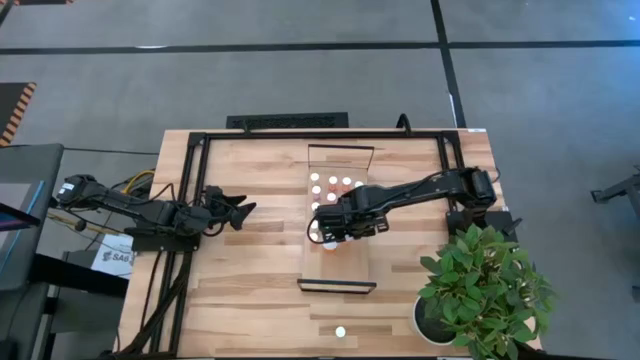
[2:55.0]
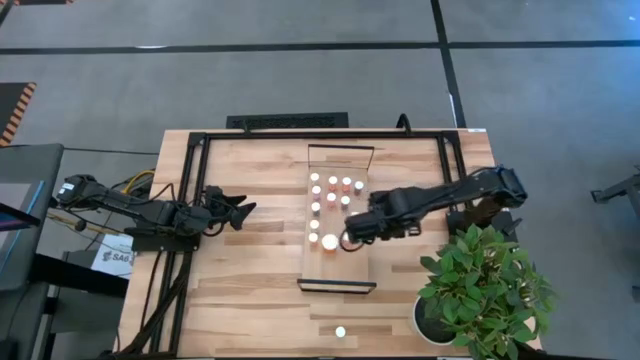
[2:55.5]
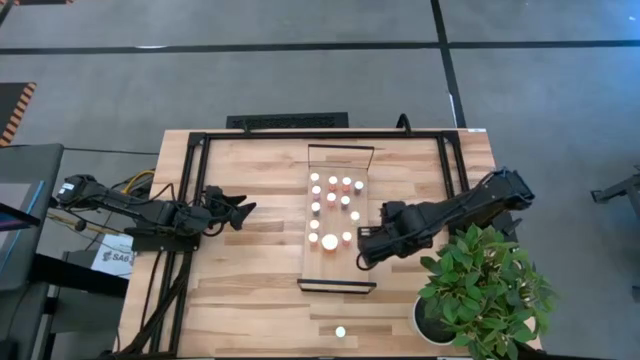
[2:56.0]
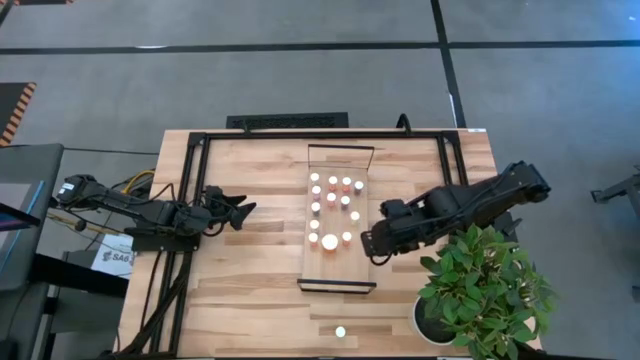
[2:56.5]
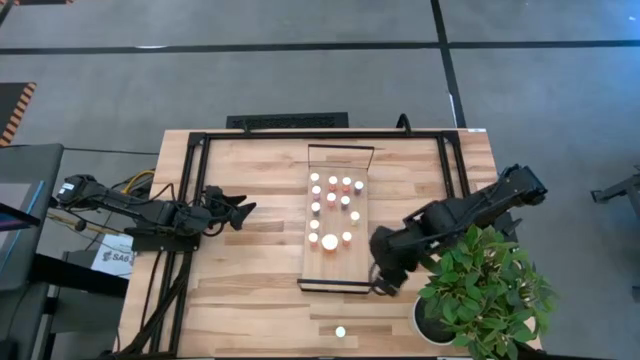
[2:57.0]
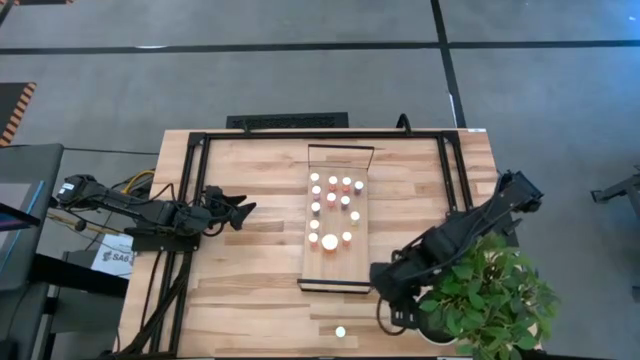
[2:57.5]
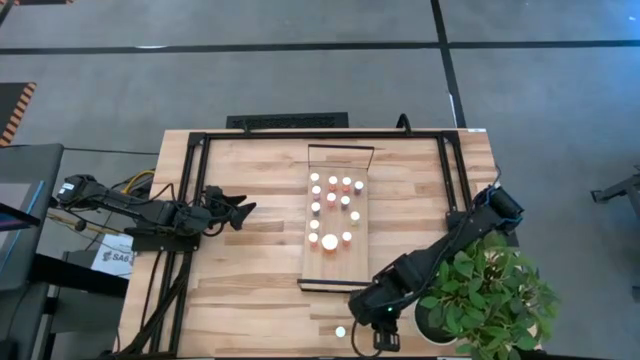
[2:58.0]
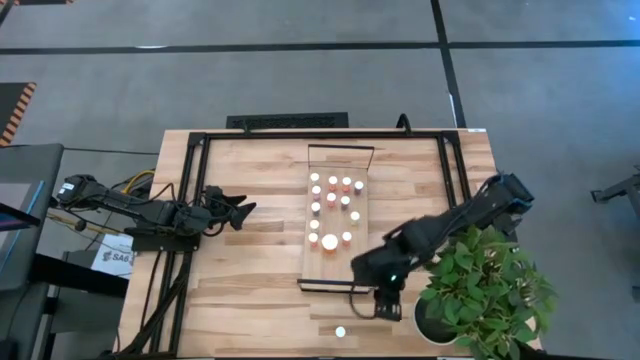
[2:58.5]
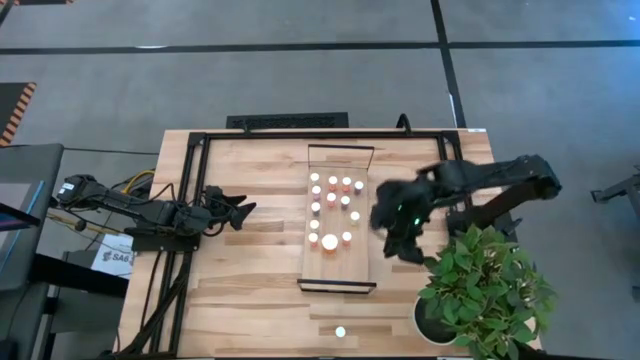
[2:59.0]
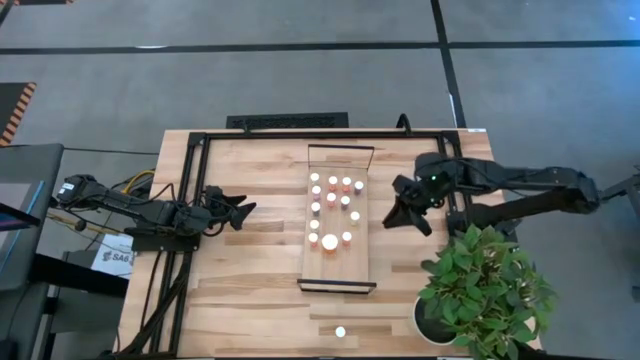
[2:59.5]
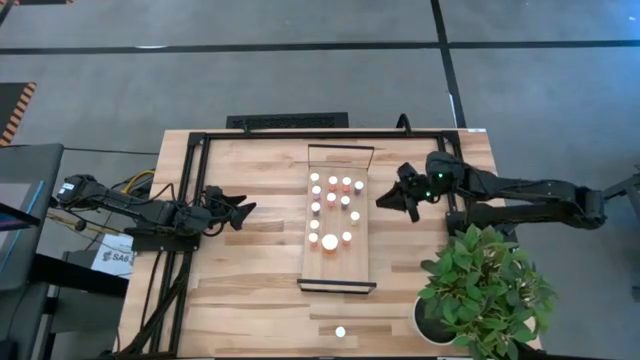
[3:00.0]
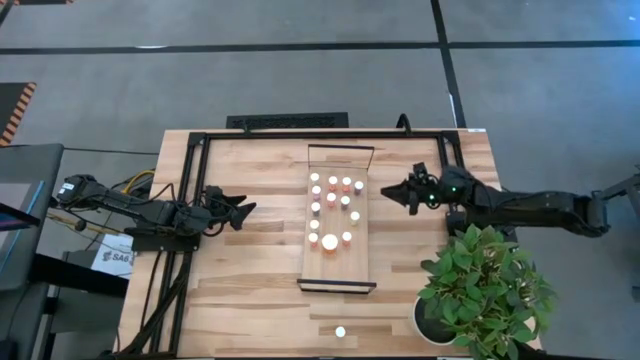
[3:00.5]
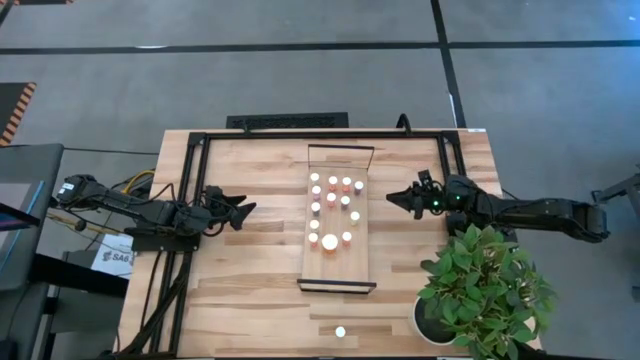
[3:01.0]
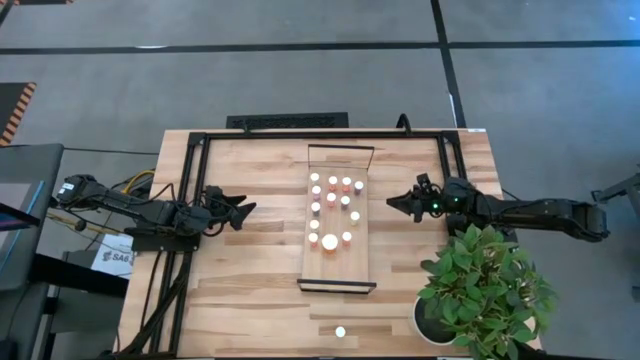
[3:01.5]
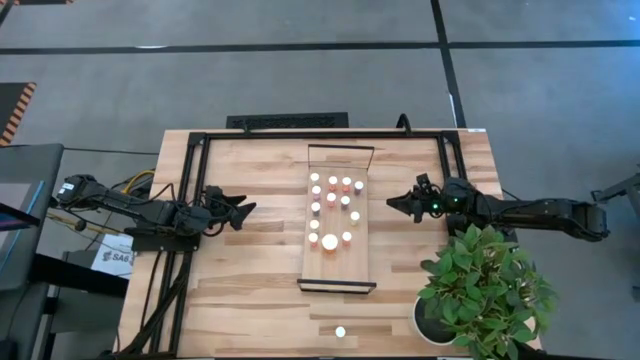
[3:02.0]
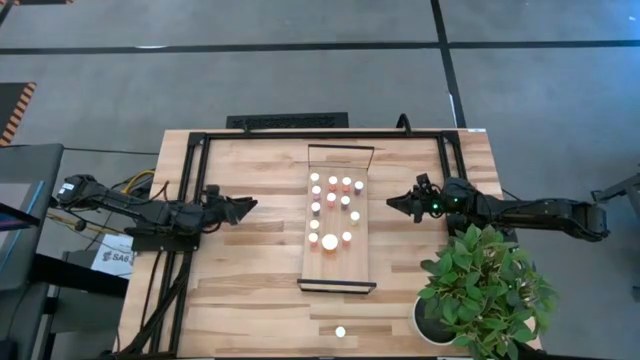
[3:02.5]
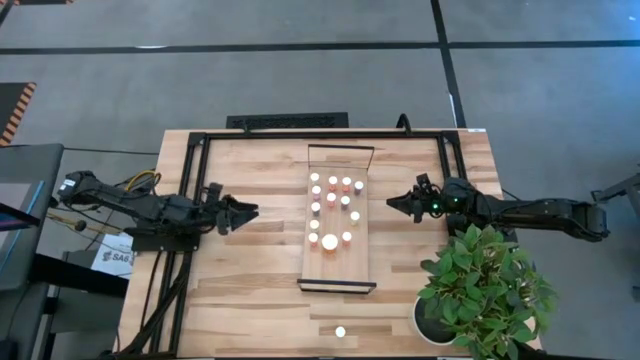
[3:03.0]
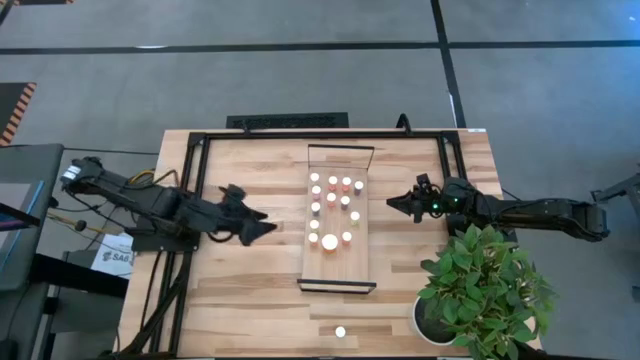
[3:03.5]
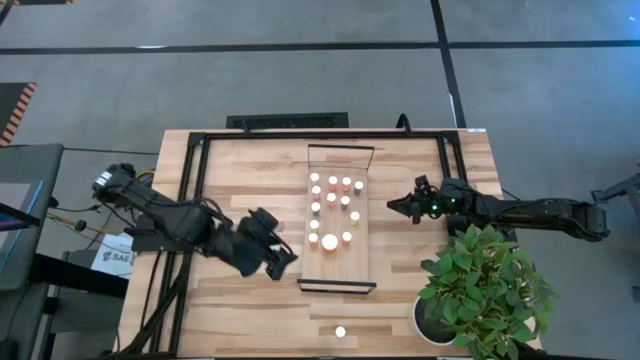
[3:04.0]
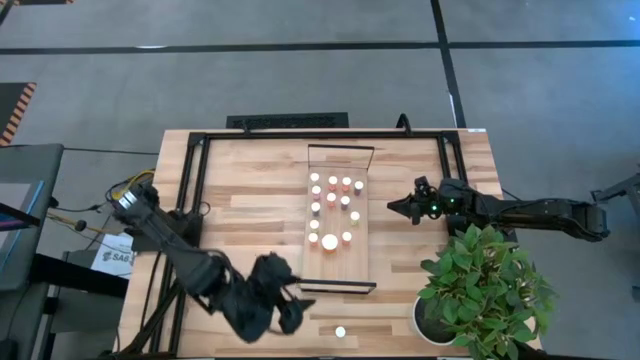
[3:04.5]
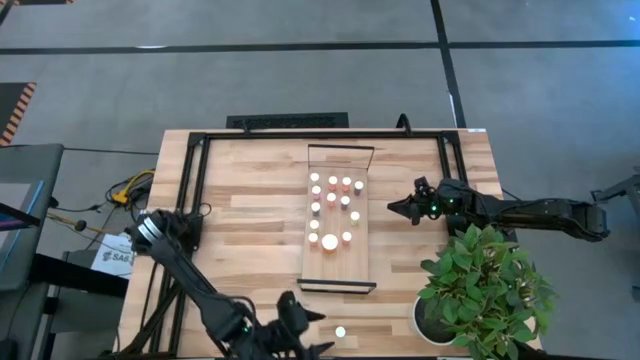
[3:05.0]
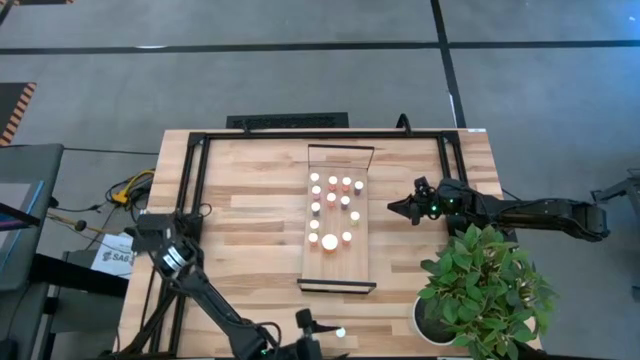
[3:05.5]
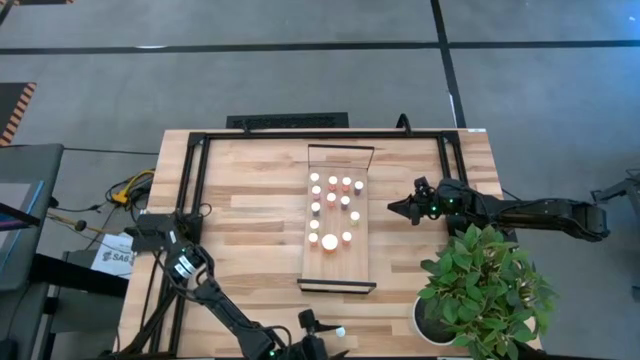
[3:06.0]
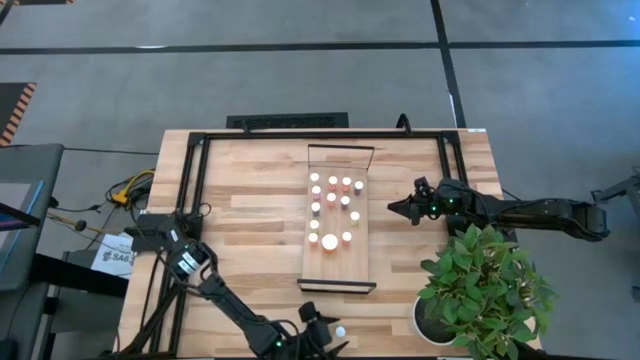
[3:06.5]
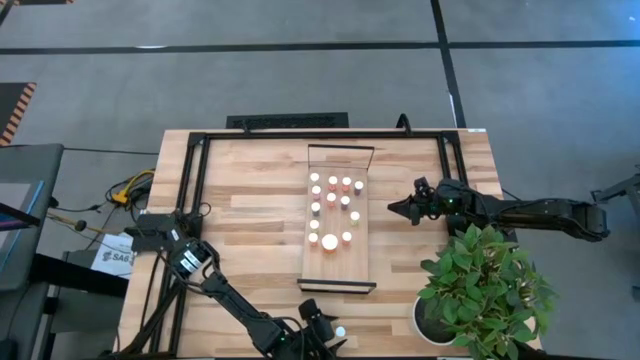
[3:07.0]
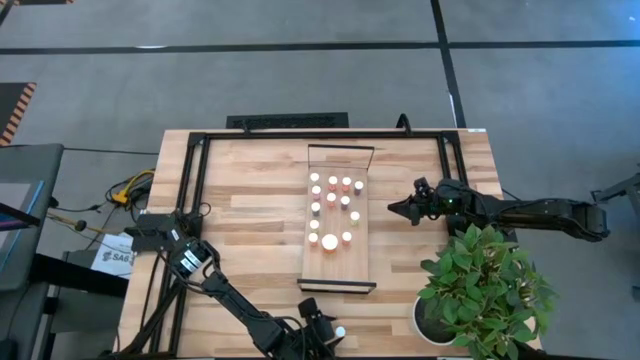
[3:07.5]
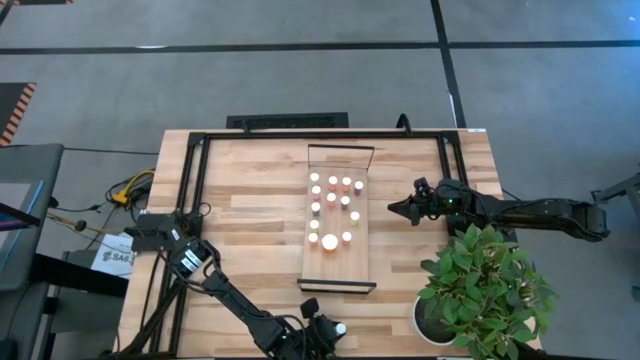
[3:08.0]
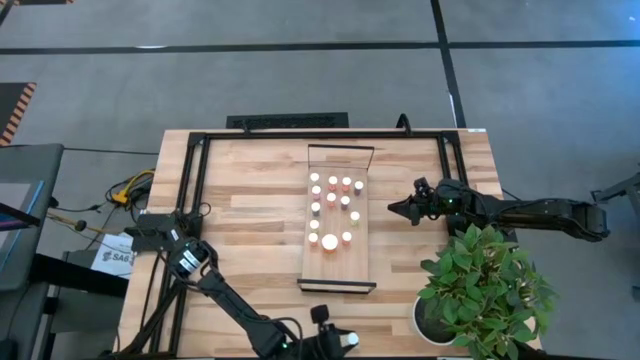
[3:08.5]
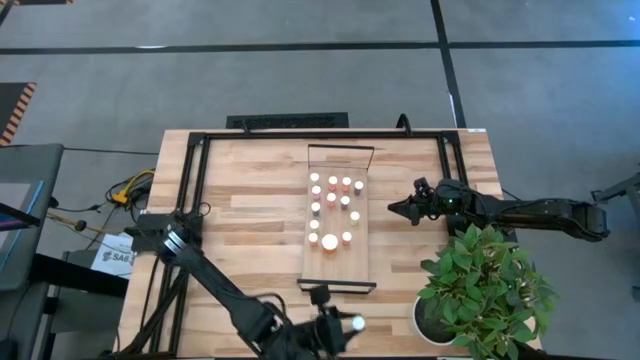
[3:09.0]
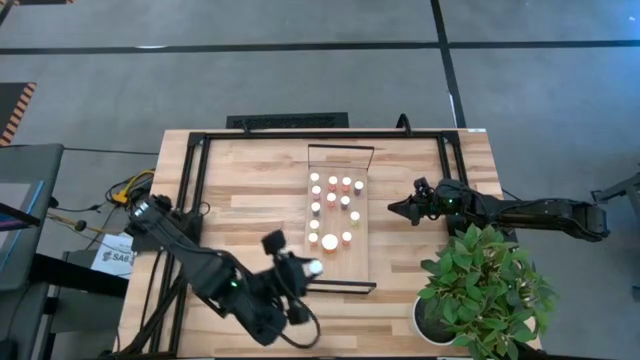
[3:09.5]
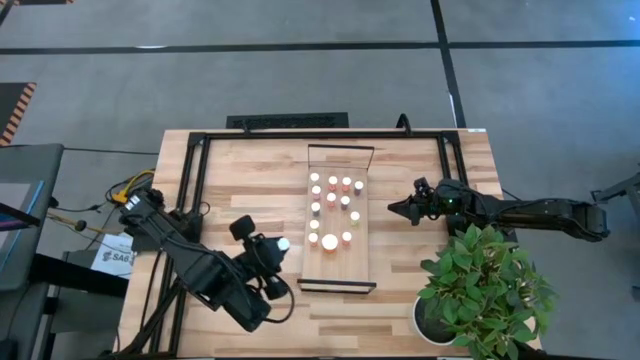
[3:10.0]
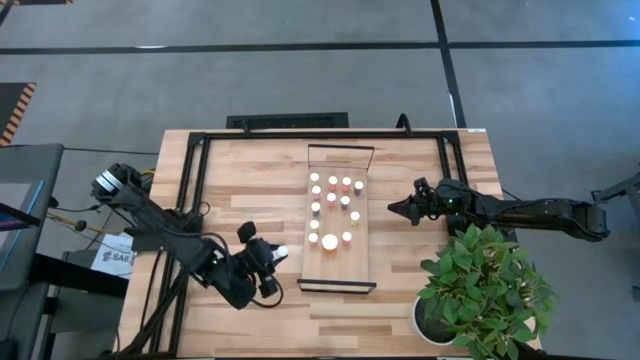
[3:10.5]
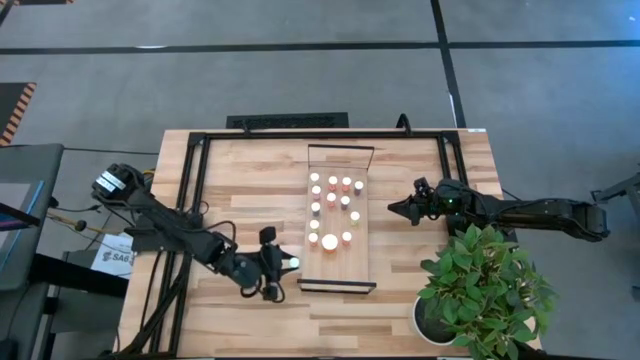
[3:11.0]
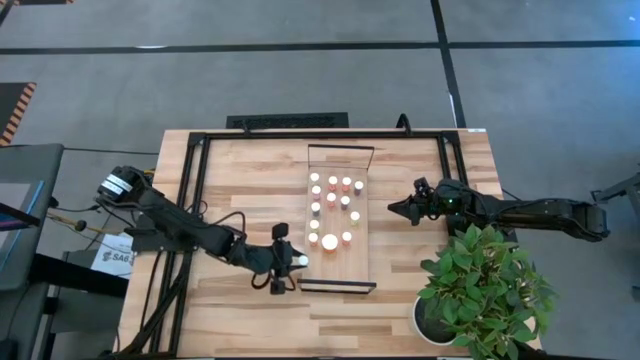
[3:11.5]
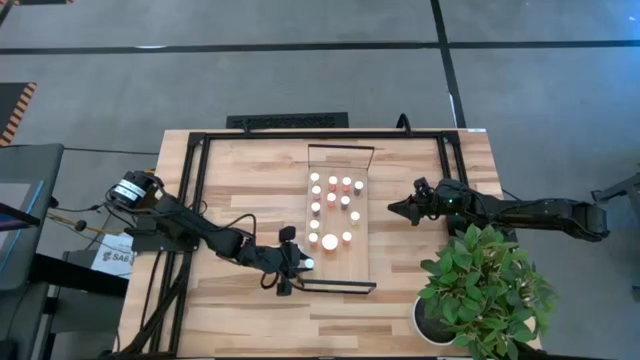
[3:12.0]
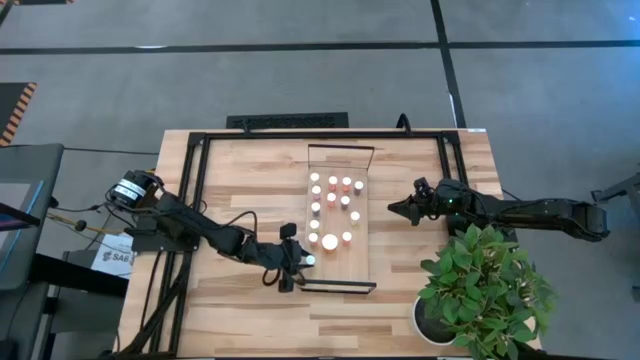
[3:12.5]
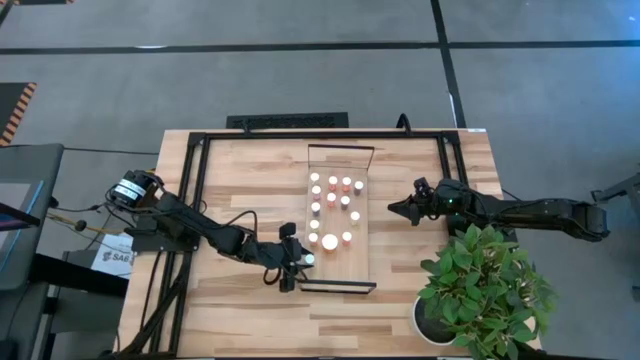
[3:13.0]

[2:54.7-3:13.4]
Task: Pick and place medicine bottles onto shelf by color
Put the yellow pill bottle on the shelf

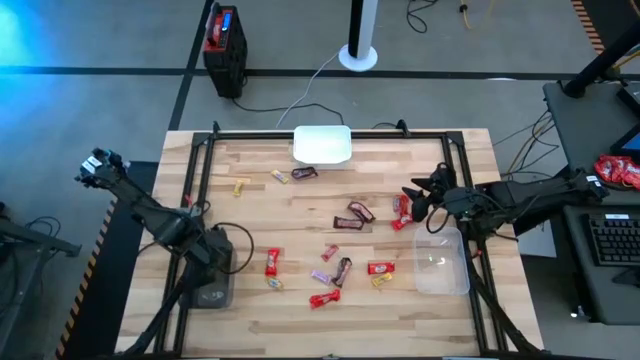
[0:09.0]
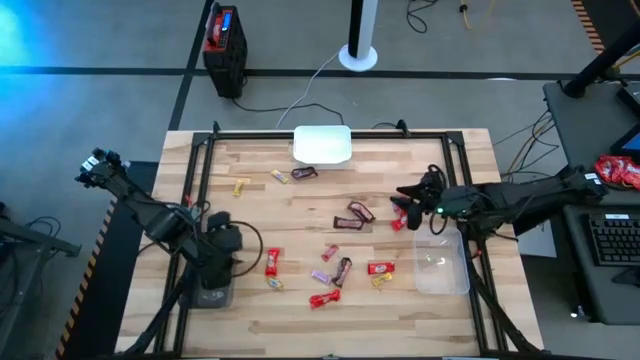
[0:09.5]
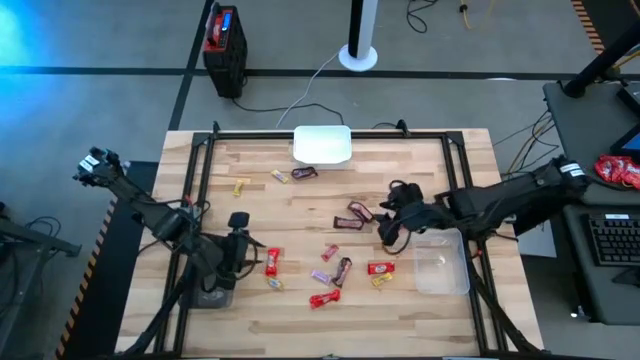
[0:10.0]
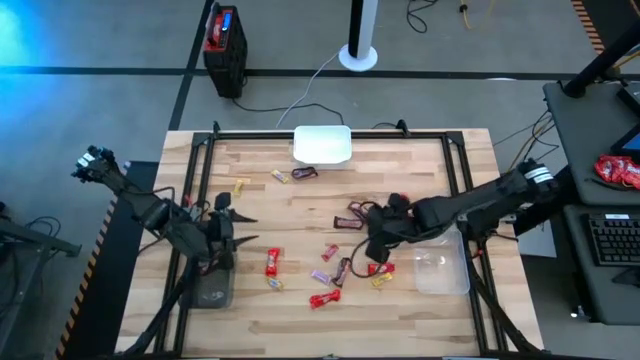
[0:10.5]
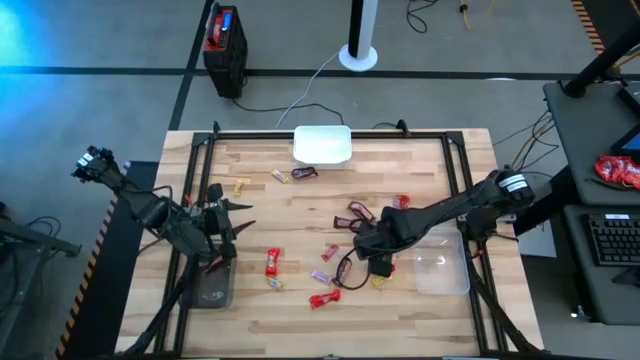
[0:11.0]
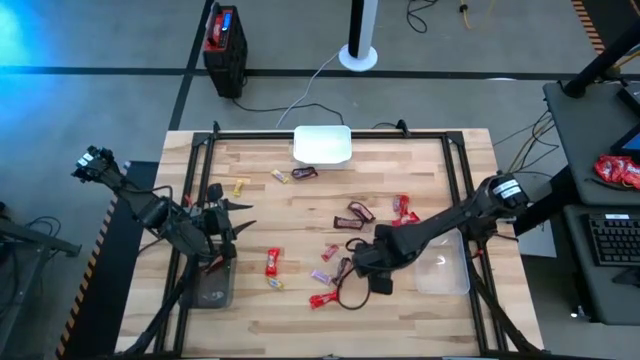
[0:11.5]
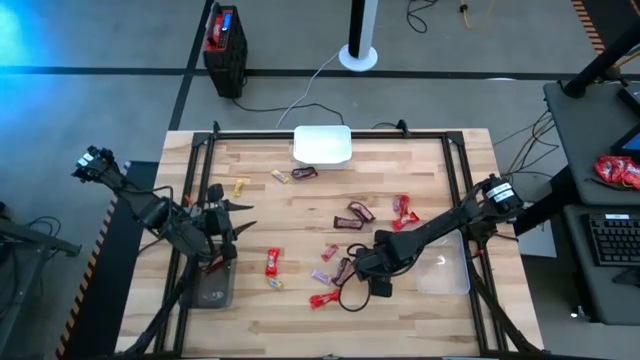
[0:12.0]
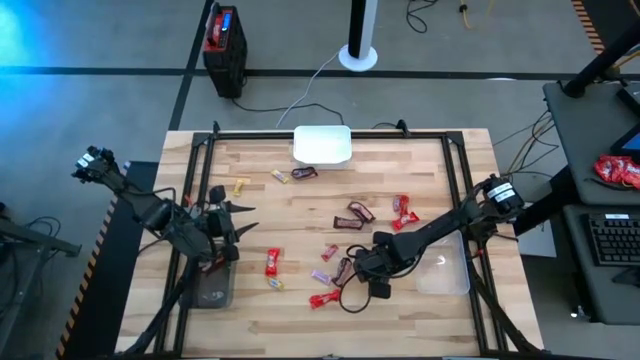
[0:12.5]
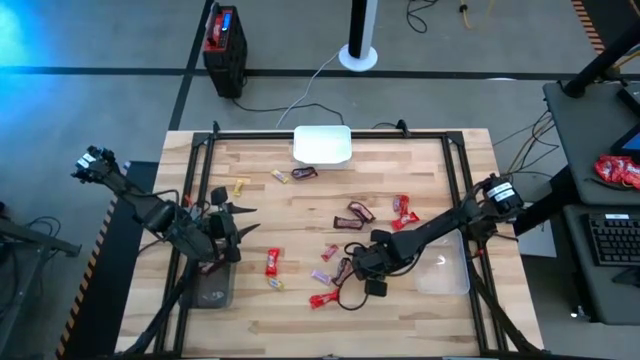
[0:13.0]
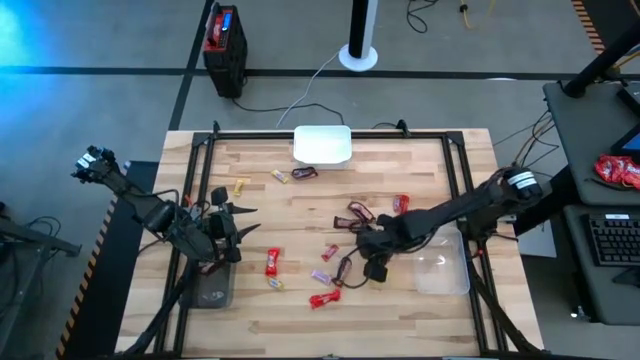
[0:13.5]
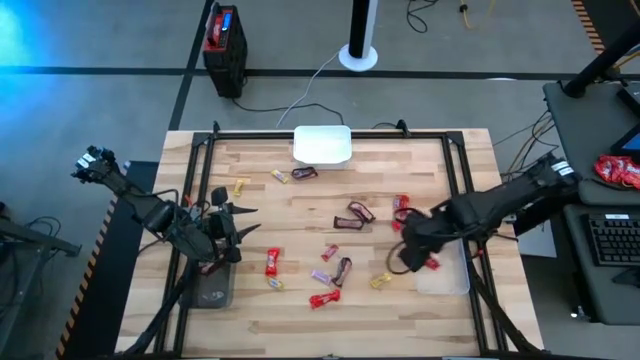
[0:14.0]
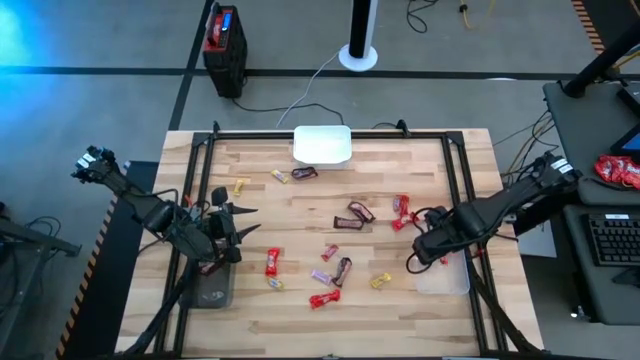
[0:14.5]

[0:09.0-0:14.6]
Task: Sort candy by brand, put in halloween buckets
Put the red chocolate bar into the transparent bin
